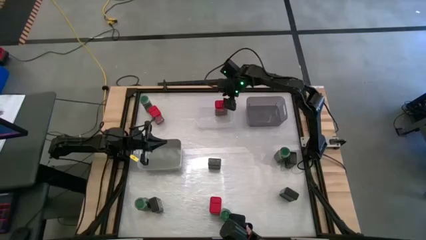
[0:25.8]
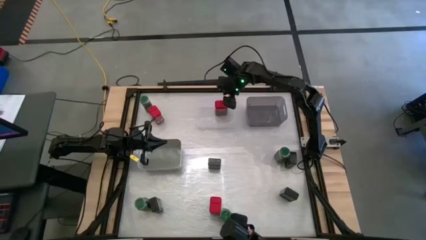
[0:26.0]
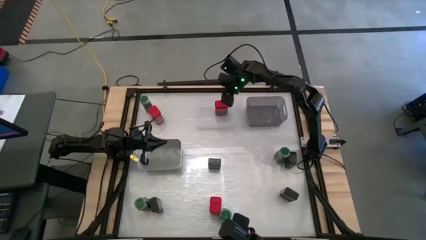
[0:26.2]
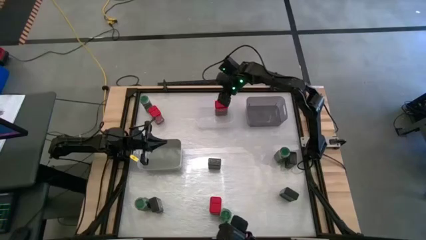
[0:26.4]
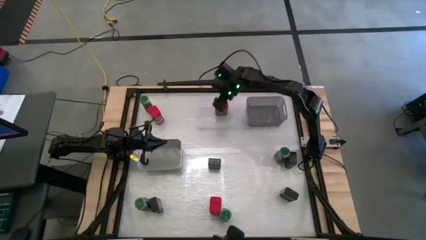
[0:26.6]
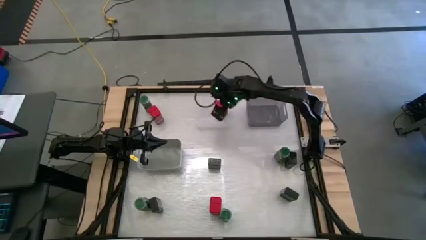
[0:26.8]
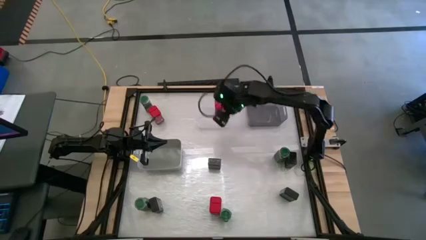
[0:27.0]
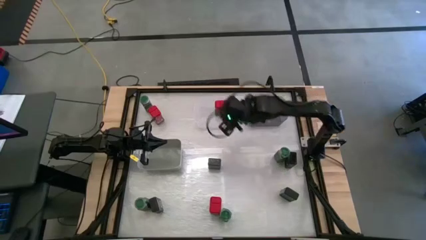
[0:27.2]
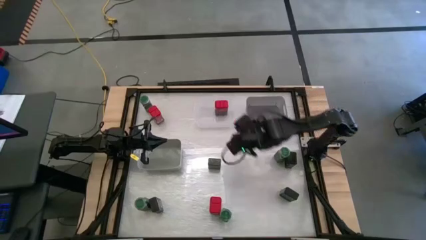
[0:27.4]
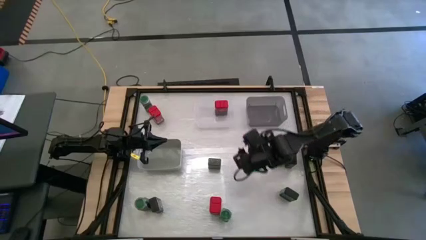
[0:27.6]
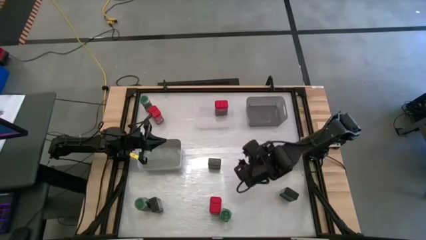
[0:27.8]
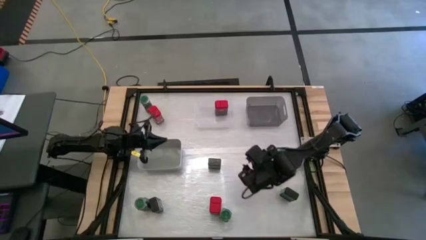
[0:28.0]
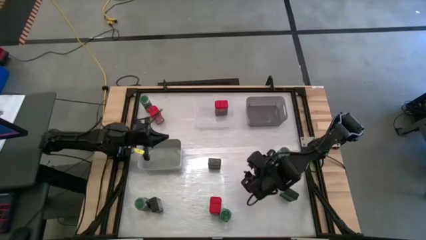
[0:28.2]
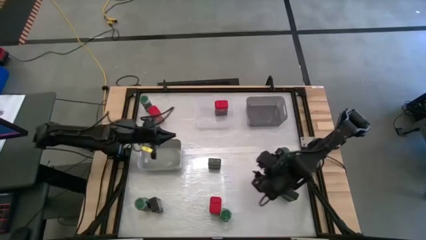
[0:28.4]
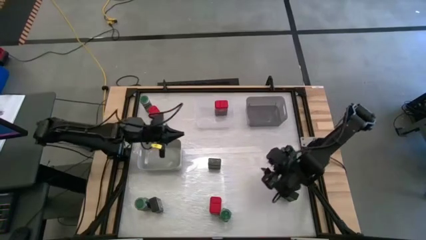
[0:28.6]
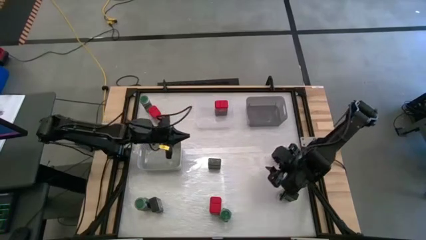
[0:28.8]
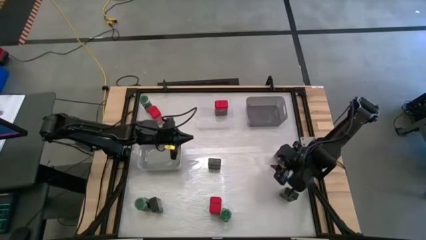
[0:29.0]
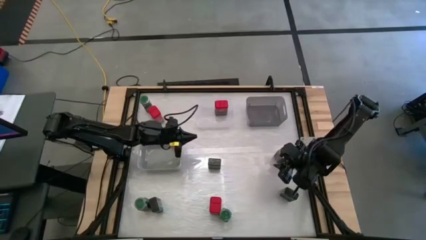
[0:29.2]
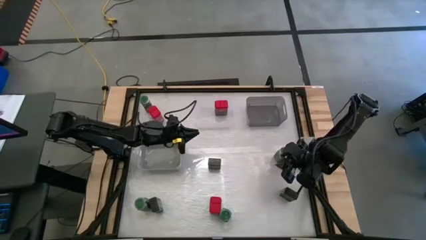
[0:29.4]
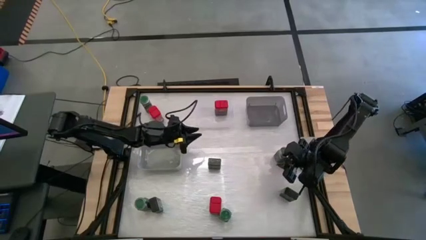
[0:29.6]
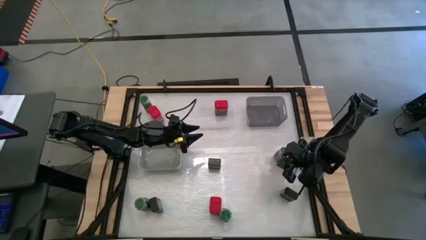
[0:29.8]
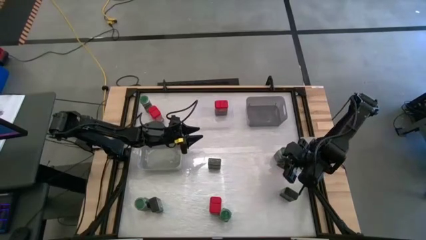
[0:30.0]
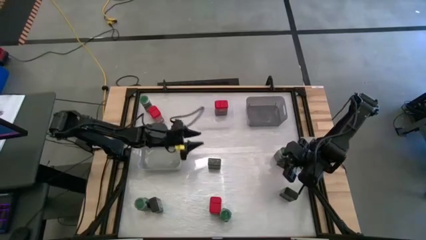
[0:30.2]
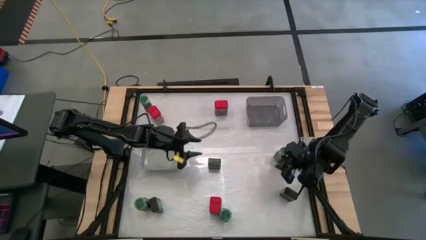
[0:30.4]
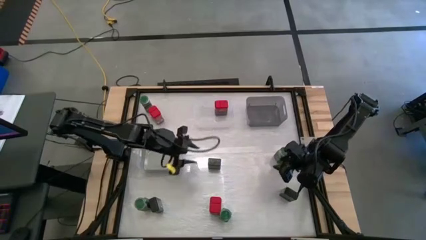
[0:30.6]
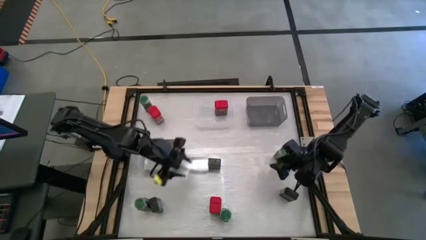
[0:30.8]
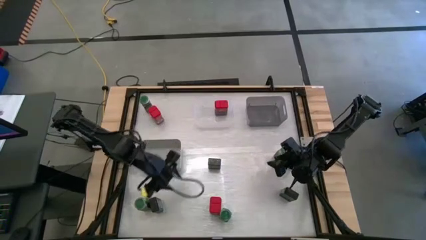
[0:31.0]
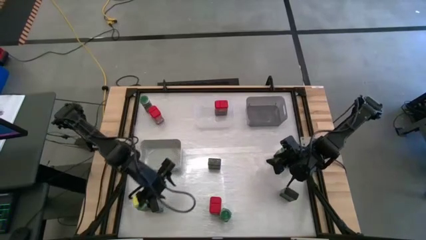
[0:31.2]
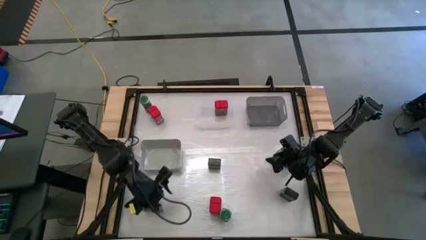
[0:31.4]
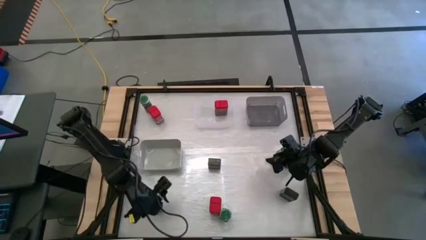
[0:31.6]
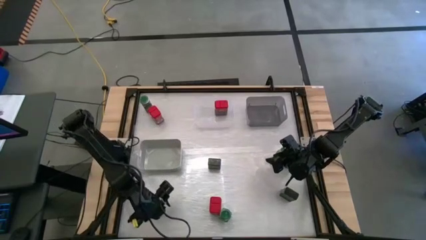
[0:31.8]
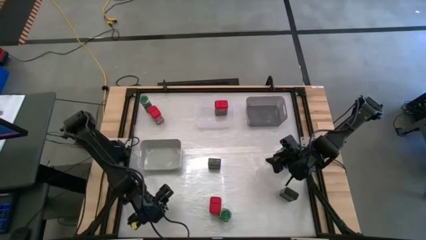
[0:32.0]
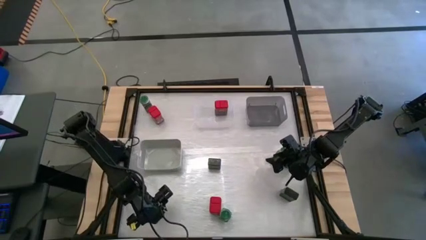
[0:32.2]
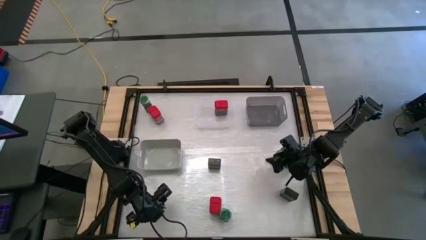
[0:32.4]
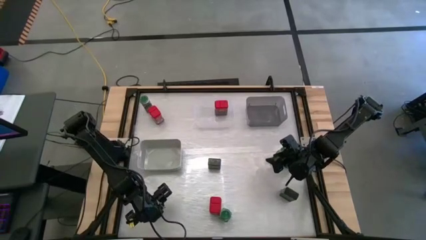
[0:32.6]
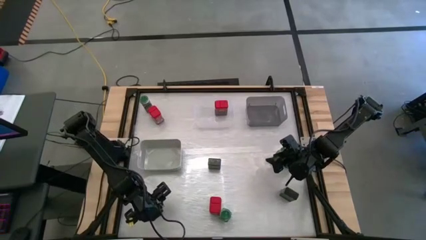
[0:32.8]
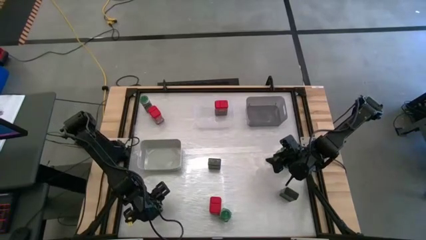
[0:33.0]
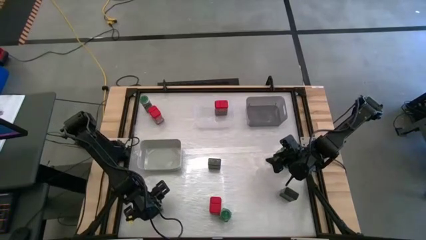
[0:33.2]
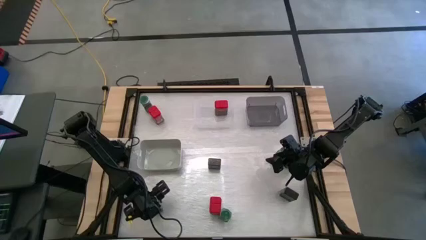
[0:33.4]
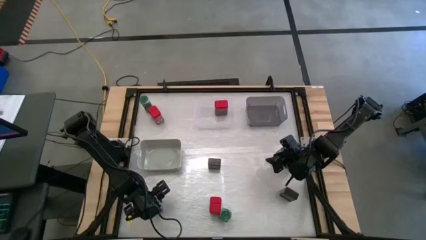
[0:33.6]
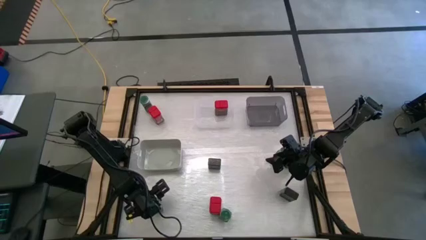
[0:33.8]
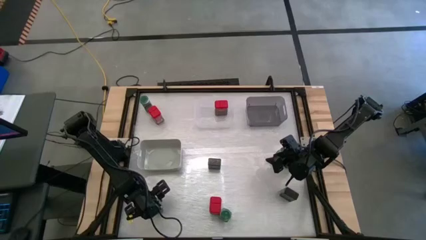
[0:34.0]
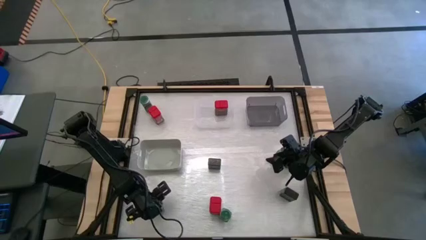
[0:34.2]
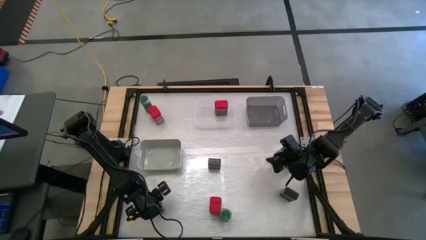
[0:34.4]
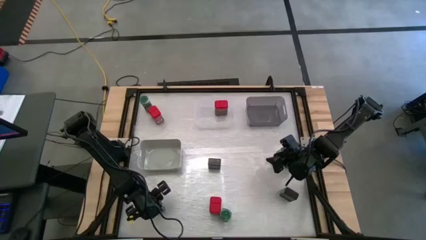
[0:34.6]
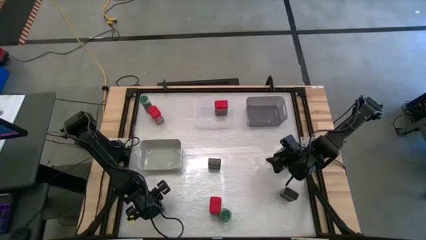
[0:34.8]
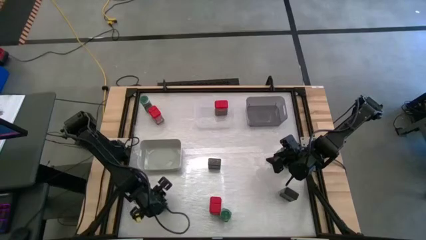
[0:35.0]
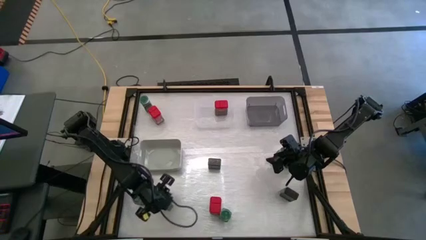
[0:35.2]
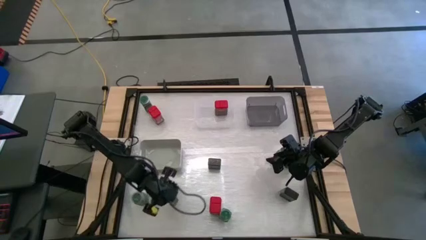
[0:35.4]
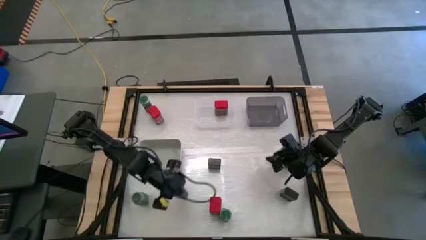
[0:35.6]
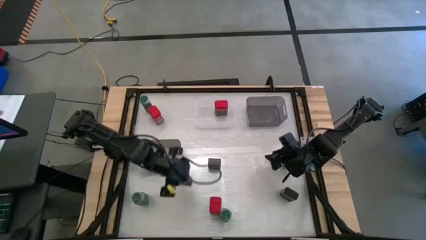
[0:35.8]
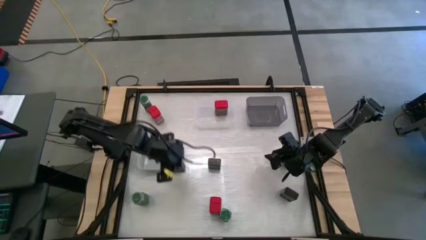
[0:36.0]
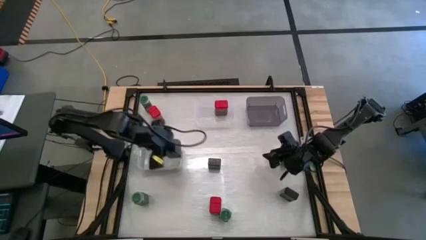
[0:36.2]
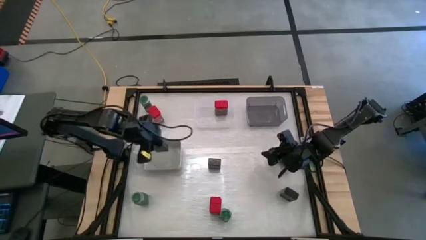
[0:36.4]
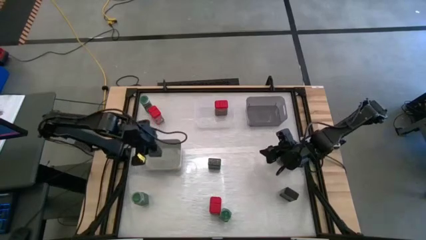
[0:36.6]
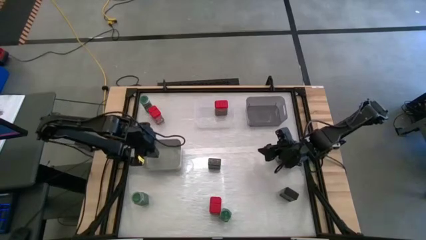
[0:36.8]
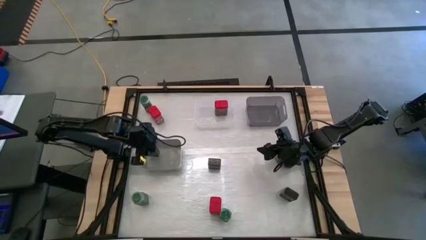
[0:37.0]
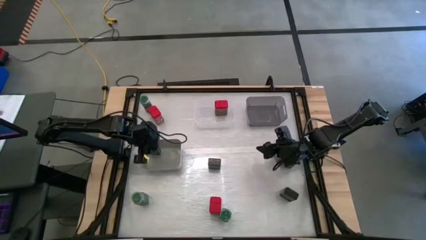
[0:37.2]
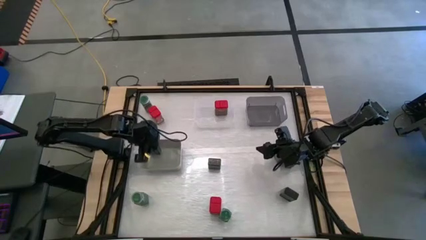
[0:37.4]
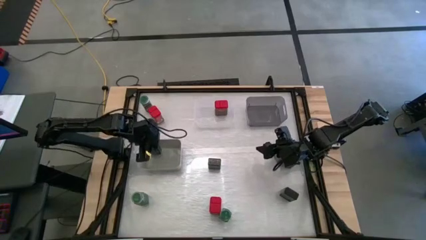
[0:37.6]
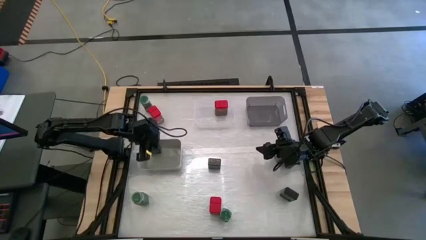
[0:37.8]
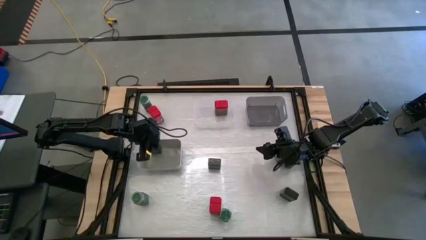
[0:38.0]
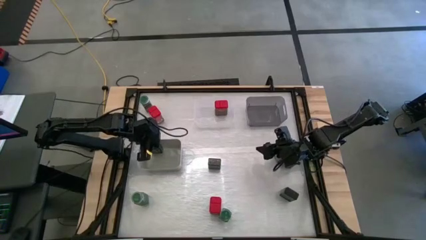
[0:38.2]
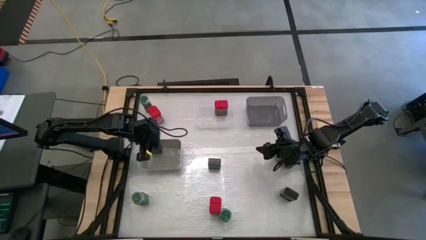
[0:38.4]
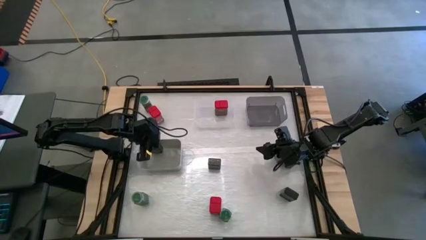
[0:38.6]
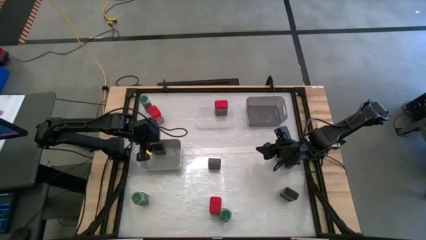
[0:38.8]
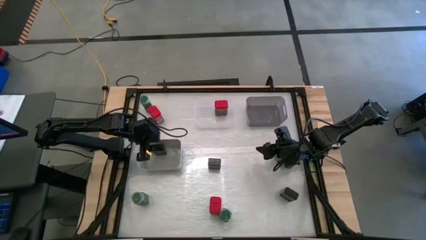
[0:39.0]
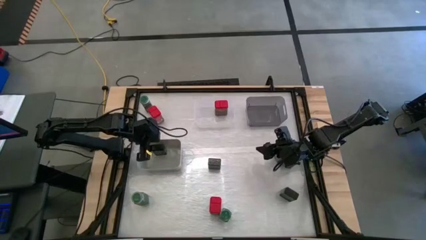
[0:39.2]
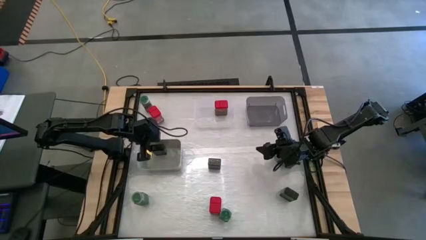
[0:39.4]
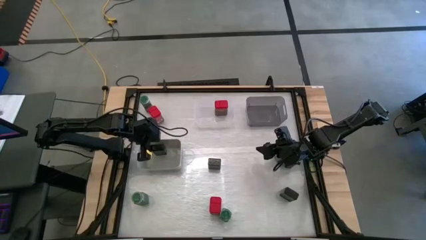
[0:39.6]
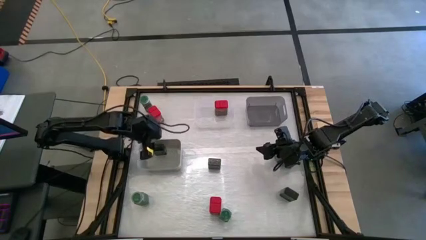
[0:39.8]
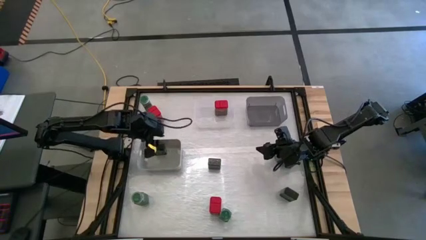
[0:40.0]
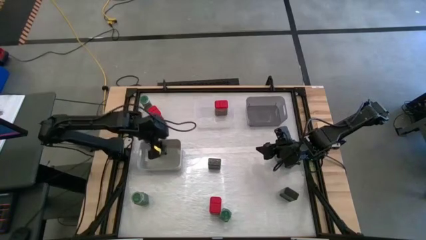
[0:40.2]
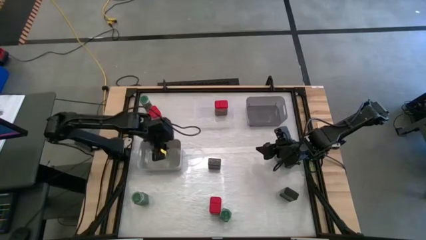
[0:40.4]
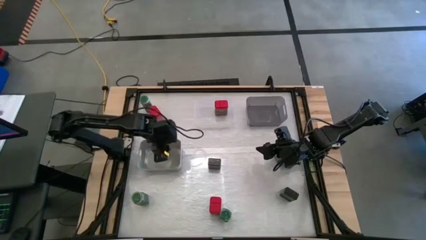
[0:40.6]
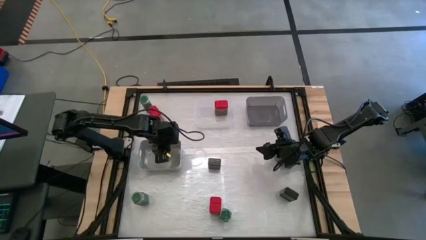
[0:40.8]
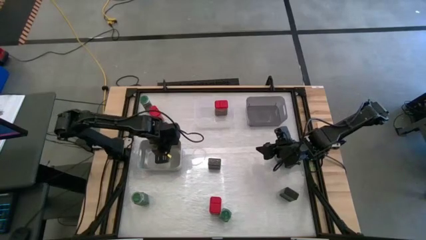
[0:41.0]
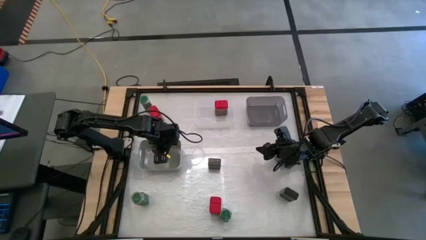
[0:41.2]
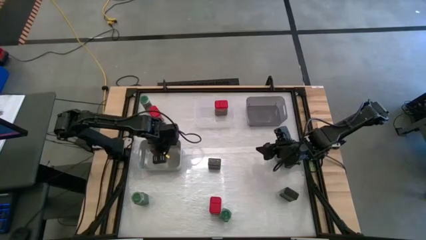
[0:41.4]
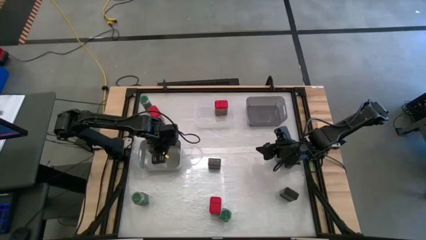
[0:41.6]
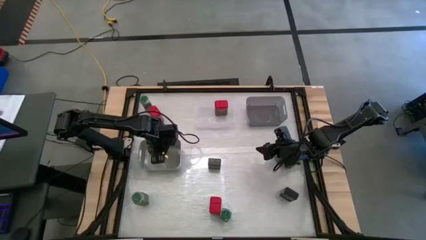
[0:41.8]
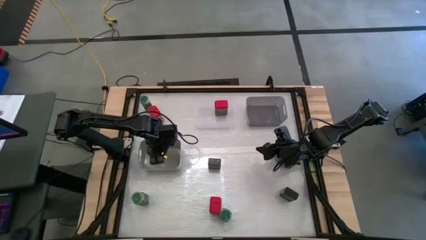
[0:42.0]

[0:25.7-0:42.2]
Task: Sort spices by type
Put the black seasoning can into the gray bin
